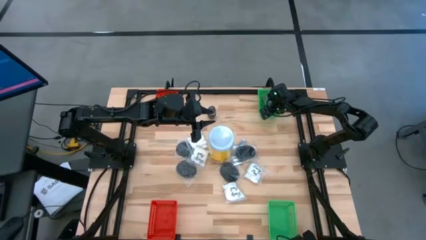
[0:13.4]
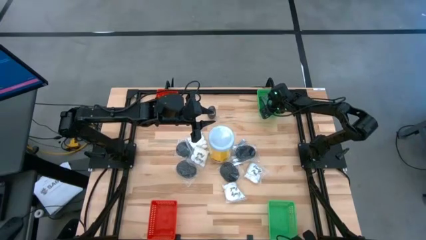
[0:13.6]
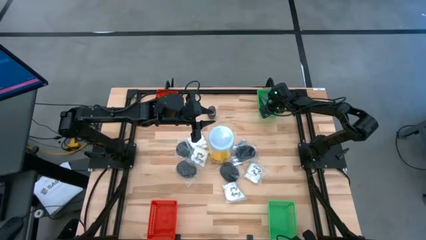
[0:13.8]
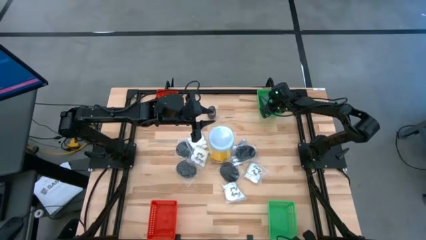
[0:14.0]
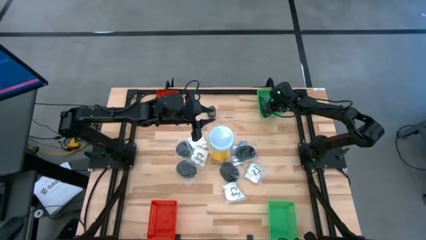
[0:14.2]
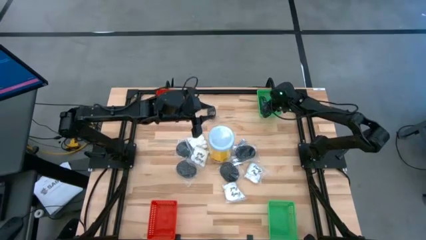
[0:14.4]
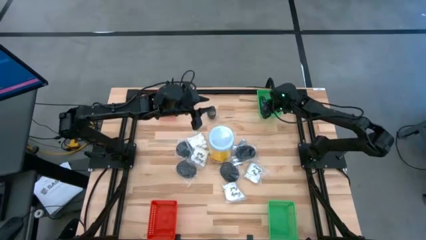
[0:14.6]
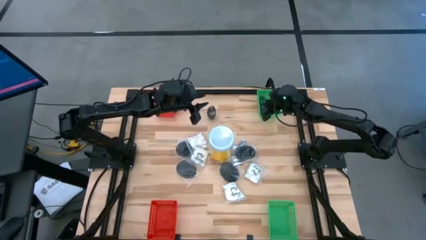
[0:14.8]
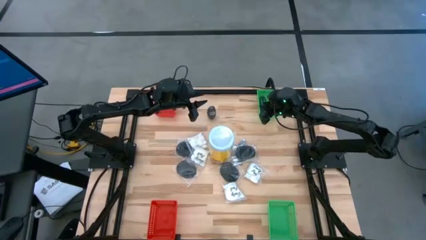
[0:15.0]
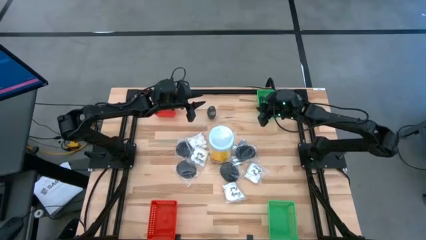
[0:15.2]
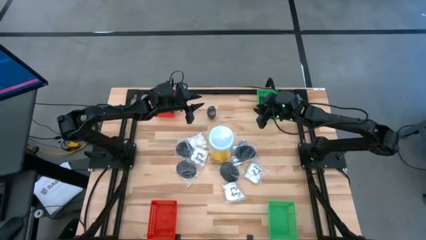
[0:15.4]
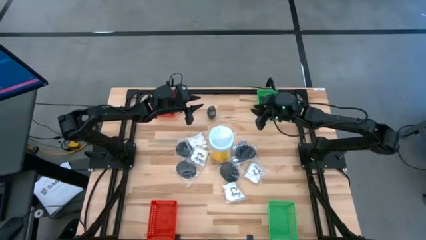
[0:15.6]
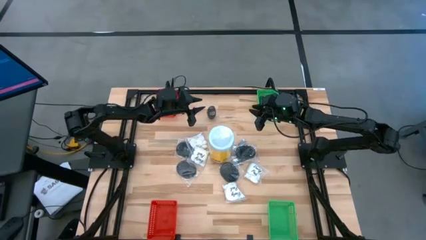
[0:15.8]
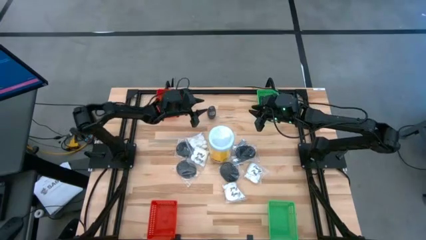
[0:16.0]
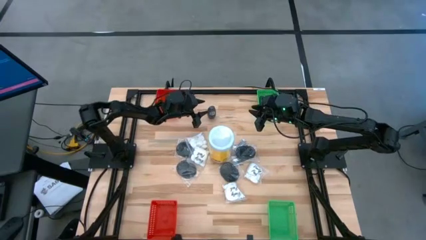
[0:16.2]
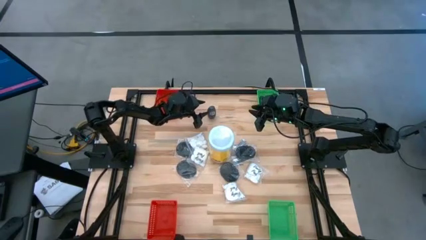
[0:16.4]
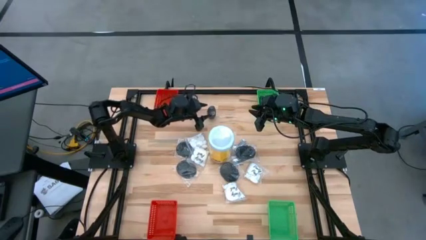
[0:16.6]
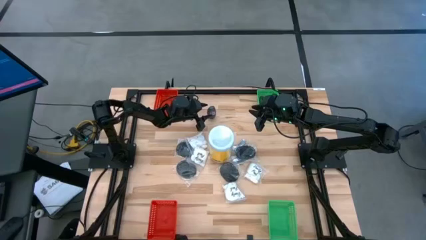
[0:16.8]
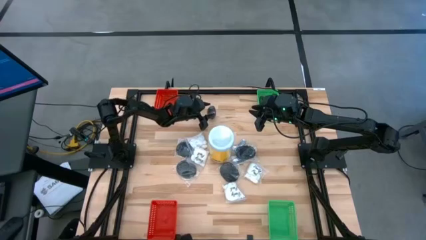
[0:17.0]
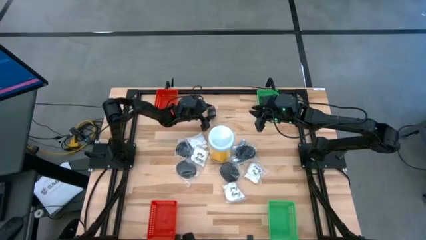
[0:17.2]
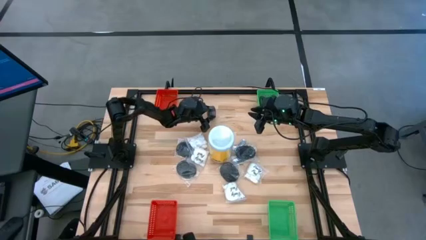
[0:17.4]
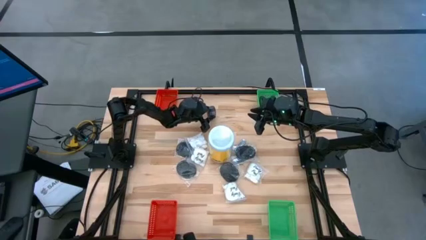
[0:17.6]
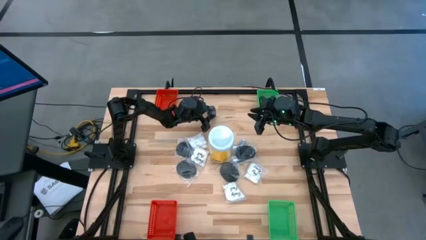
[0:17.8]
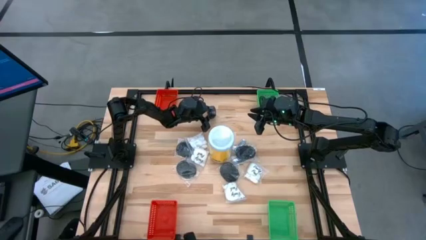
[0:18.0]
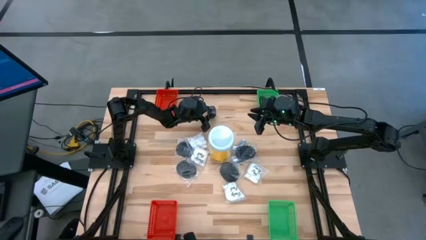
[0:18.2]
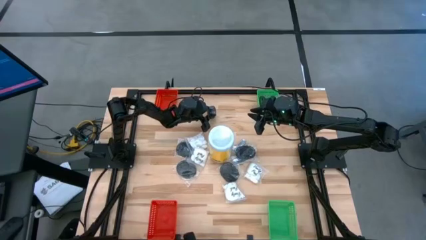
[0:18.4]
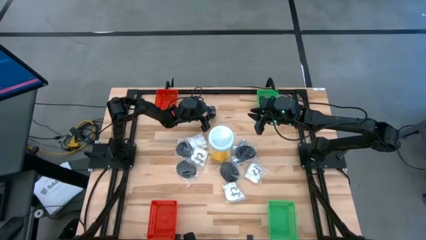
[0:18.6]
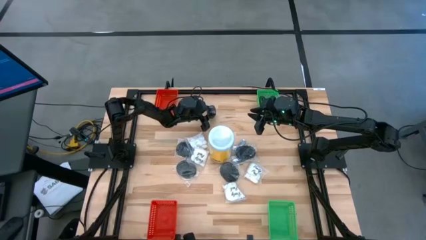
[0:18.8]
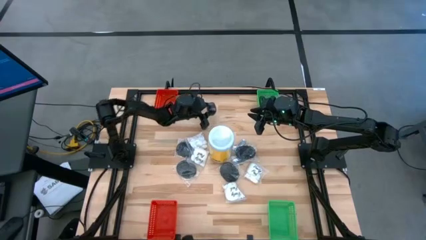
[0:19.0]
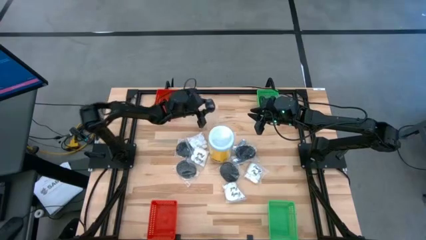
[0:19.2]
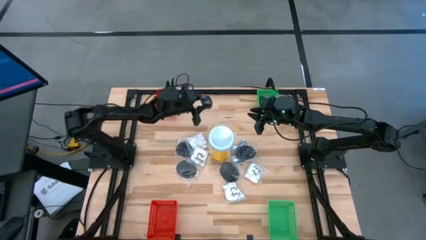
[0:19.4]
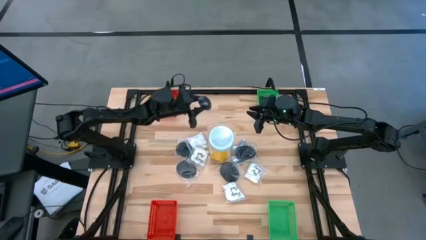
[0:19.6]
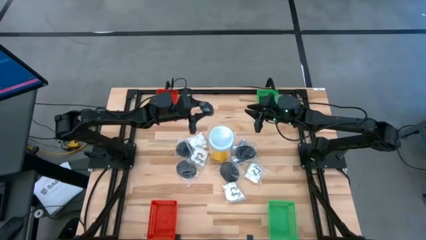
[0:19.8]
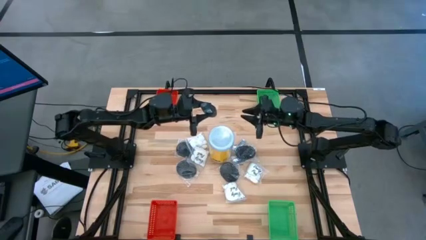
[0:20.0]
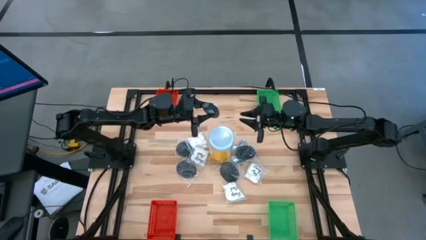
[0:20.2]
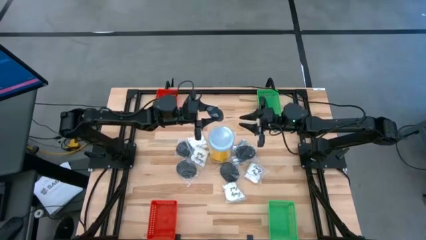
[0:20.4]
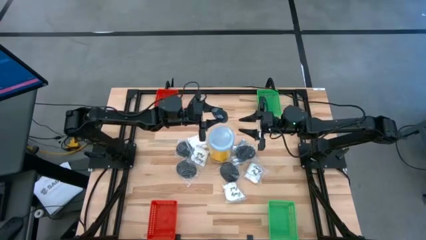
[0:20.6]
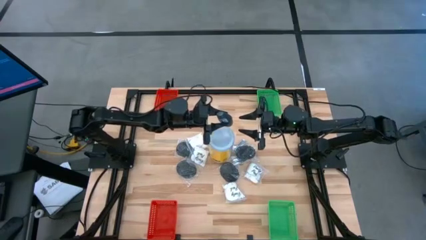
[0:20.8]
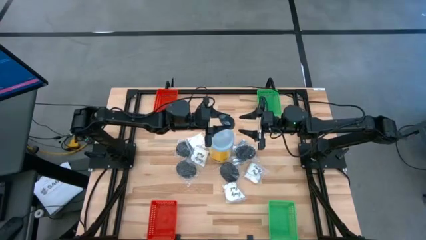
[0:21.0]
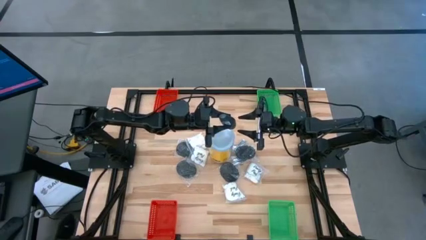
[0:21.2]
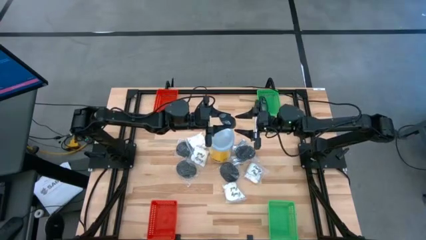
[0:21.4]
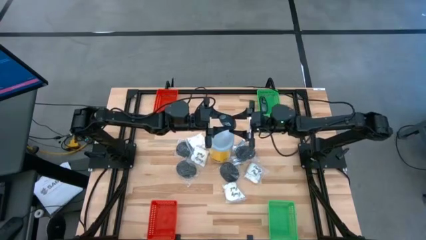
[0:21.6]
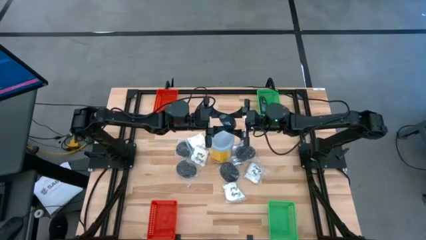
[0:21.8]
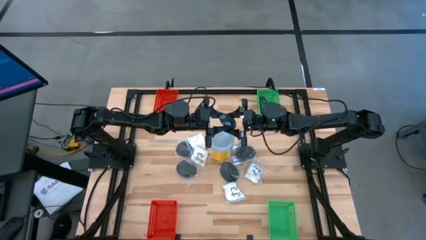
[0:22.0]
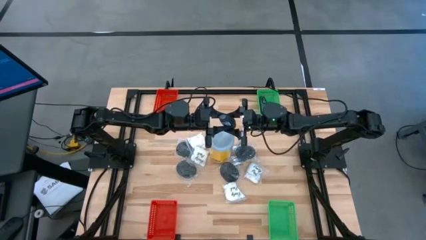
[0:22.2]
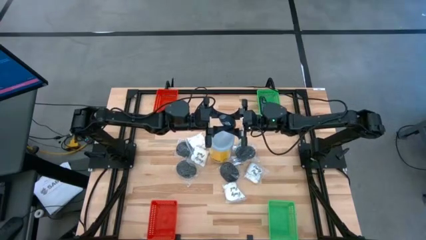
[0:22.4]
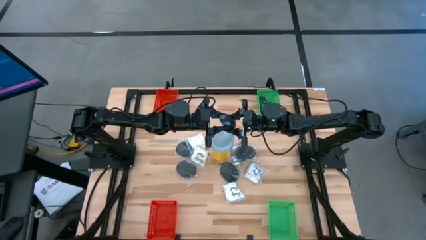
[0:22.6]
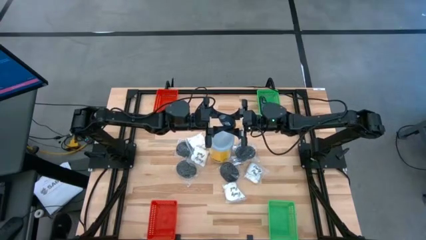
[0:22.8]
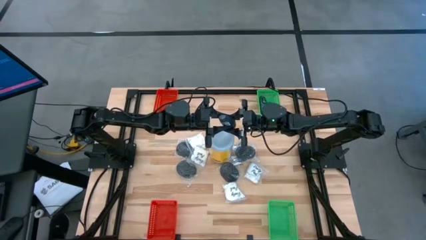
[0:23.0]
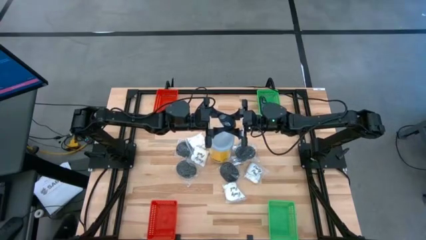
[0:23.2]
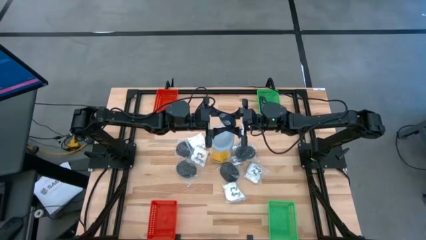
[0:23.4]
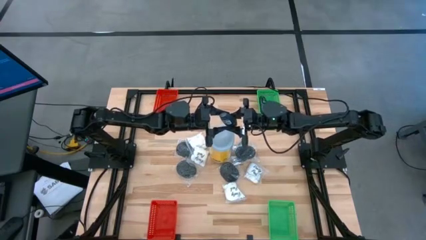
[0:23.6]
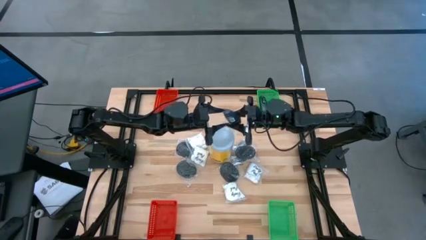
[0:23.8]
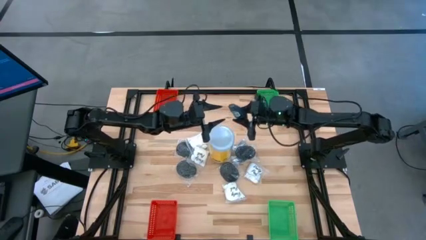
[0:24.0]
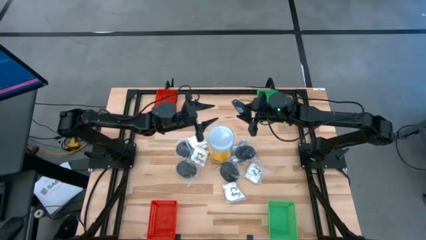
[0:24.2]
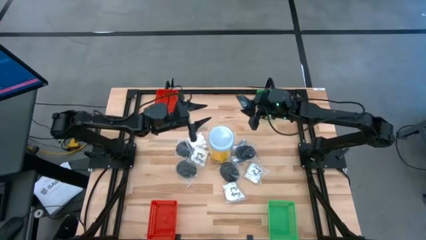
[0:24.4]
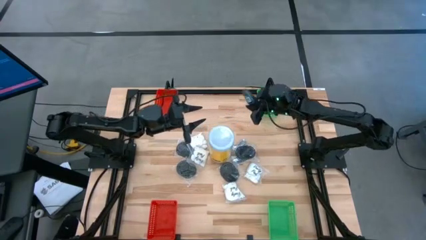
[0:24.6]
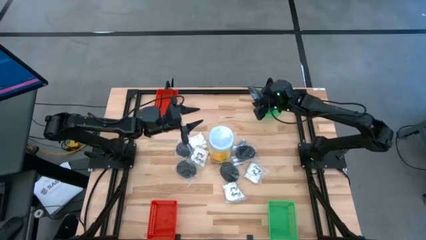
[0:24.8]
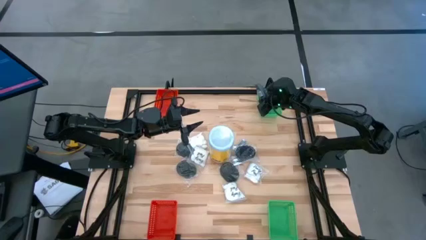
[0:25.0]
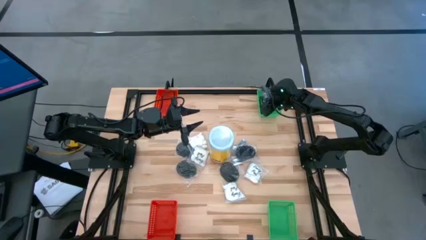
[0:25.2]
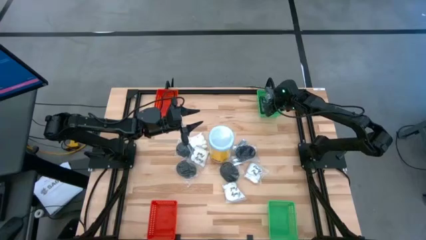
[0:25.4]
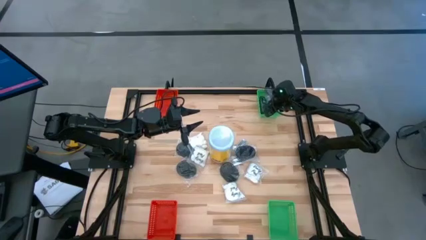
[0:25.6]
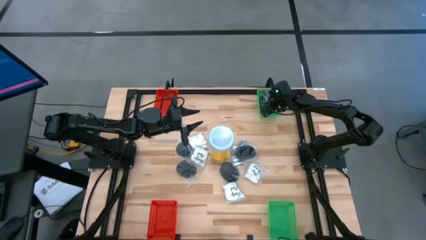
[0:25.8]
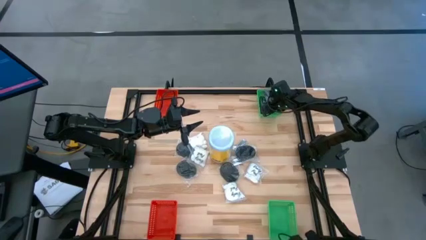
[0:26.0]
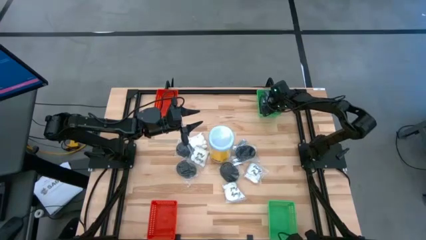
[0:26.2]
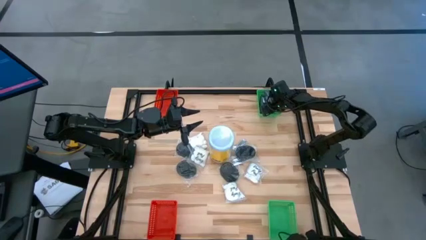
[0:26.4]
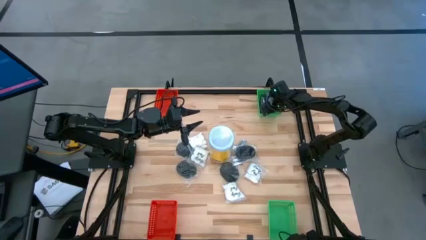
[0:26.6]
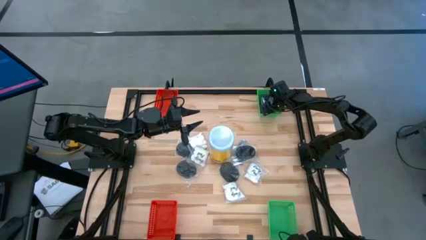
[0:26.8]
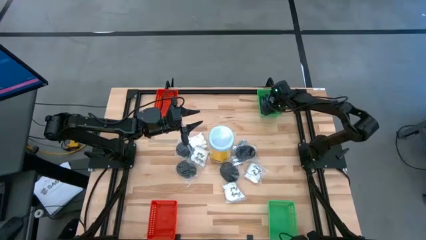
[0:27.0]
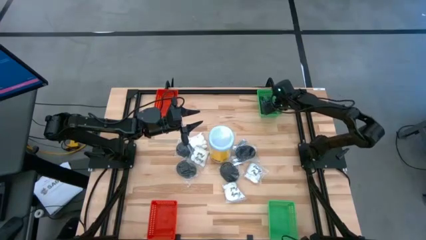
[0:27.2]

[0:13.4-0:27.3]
Task: Pick & Place Travel size toiletries
Put the gray deodorant into the top green bin

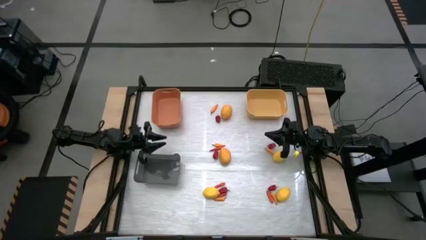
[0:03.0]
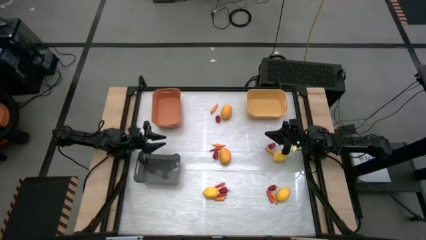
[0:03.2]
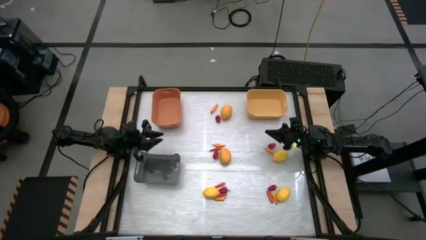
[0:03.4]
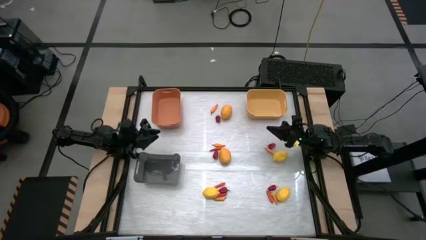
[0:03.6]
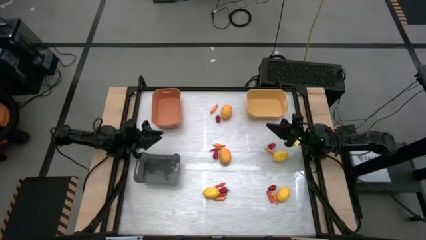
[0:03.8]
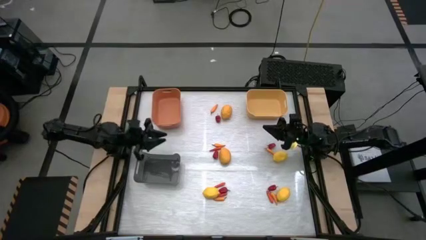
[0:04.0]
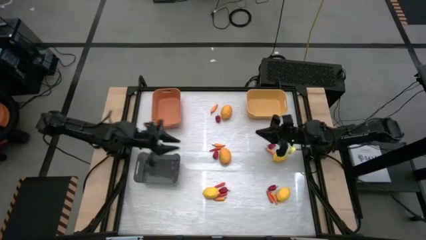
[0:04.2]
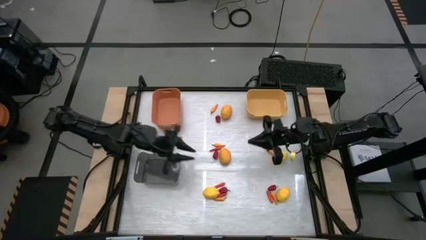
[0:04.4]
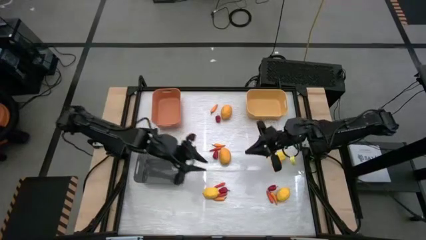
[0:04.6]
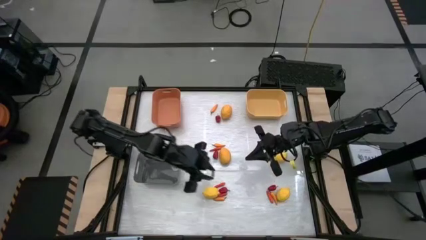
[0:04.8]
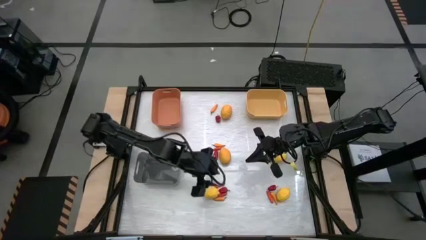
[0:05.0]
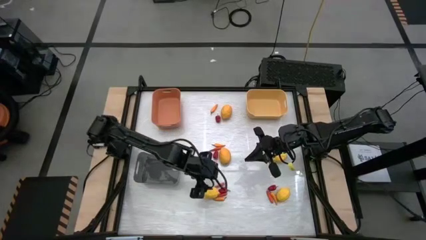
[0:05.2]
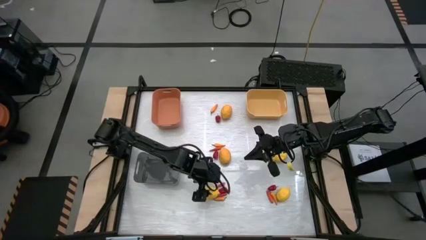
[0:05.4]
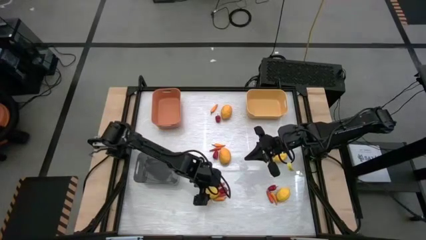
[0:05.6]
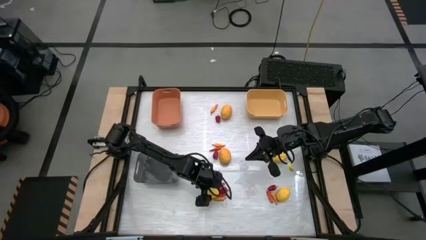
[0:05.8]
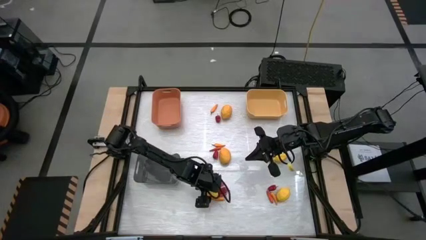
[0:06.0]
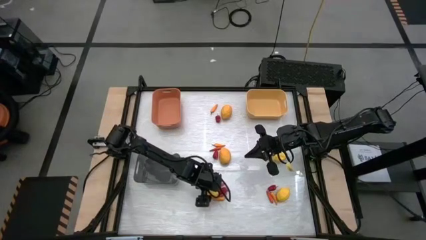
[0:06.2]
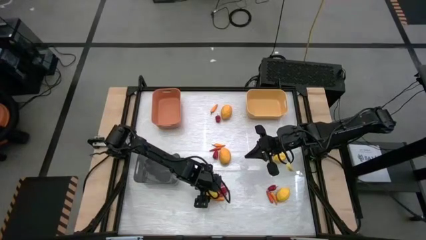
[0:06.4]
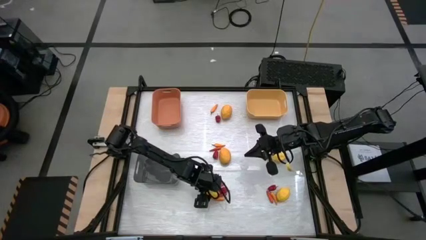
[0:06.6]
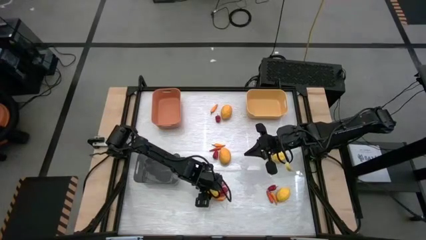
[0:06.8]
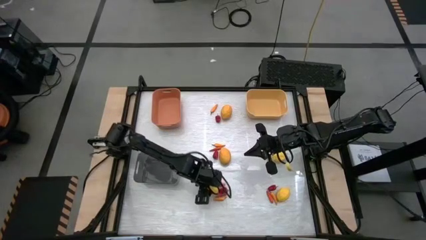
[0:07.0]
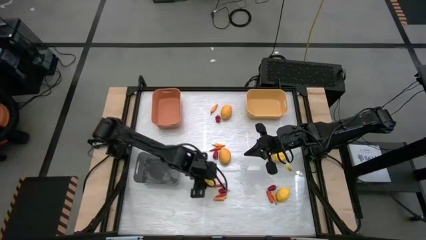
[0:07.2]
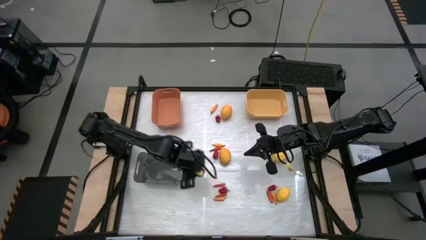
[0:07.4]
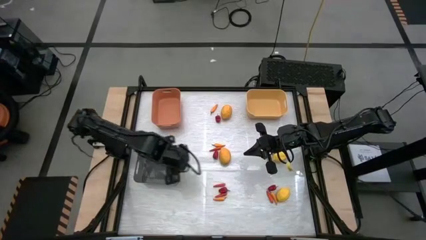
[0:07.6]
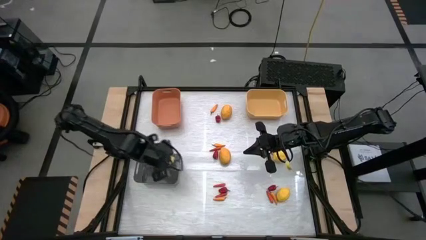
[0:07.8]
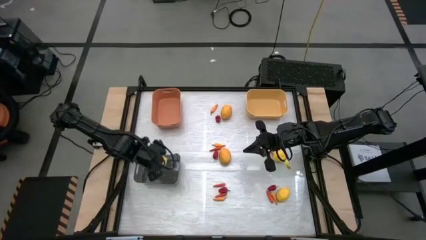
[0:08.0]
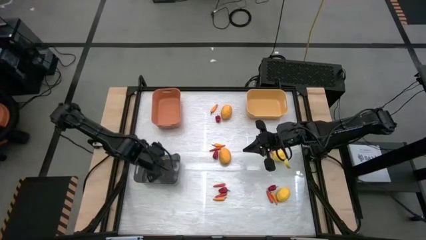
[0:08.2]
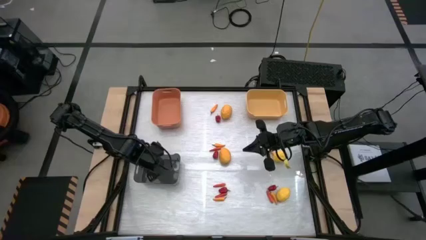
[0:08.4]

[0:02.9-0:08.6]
Task: Sort produce into baskets
Put the yellow lemon into the black bin
